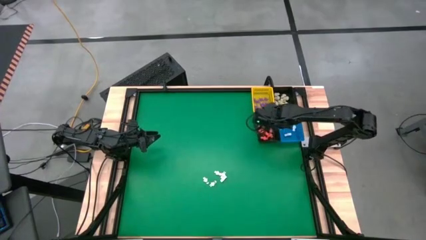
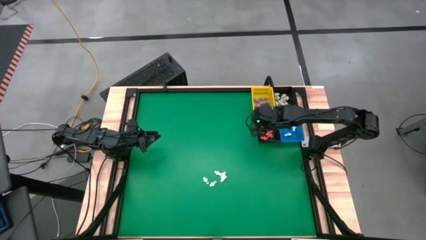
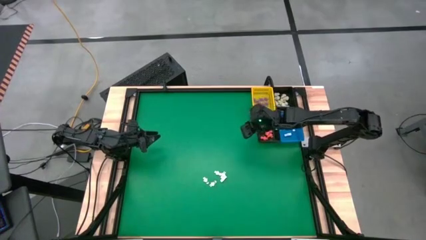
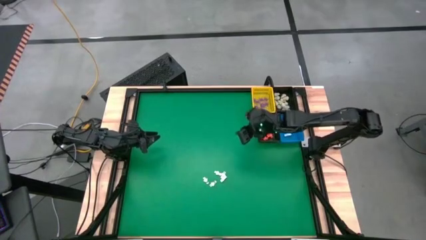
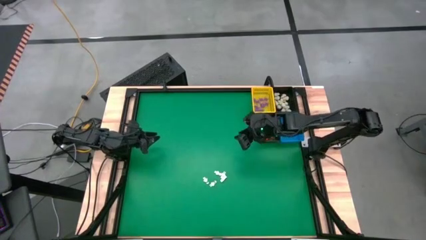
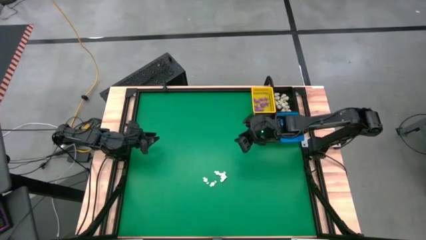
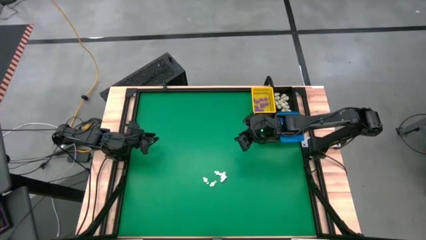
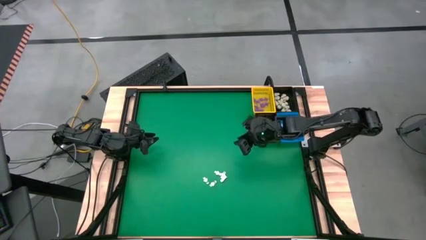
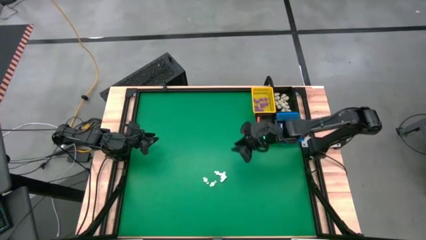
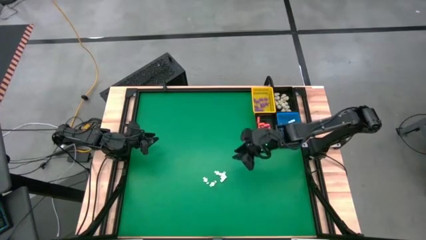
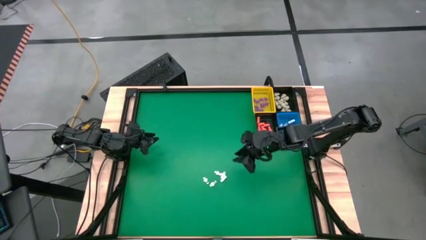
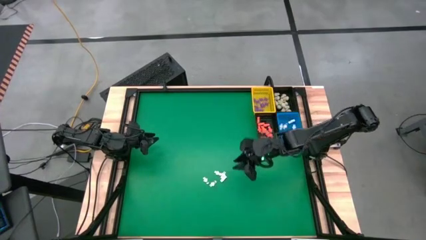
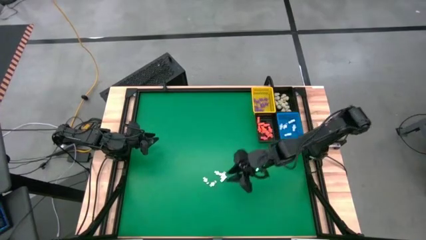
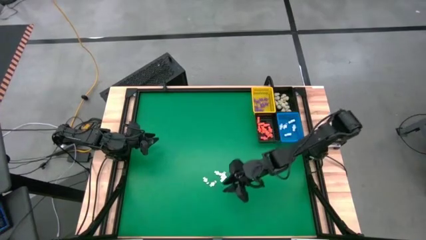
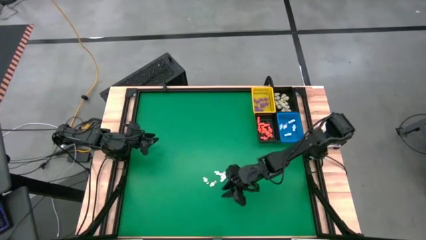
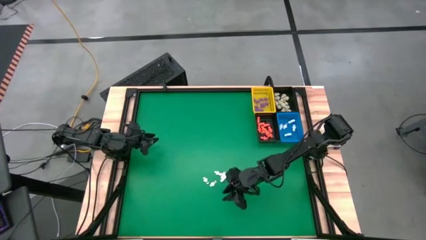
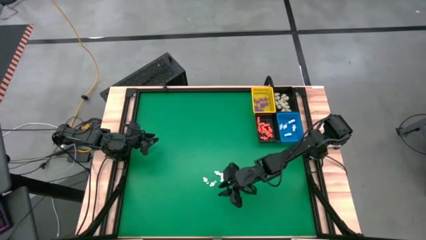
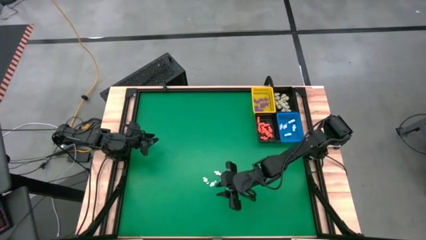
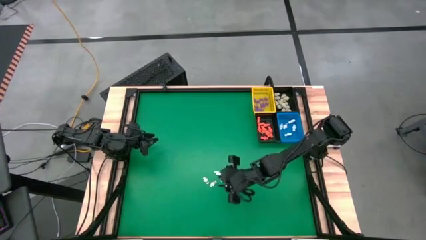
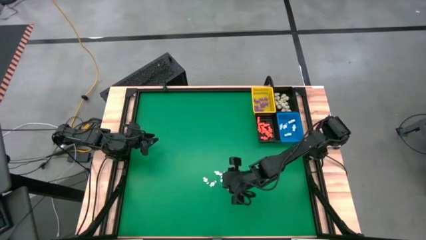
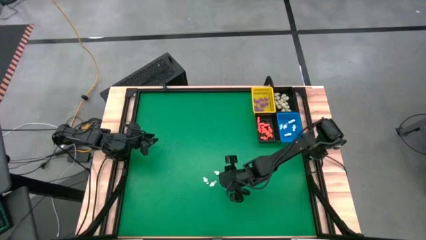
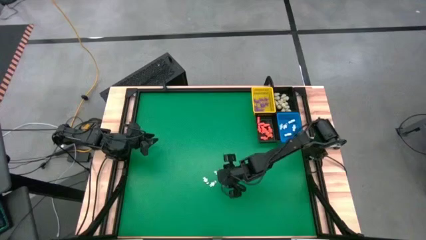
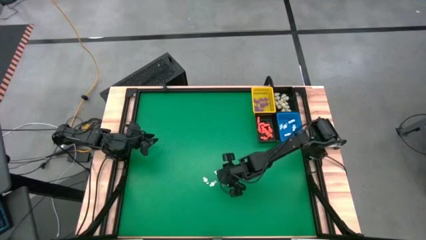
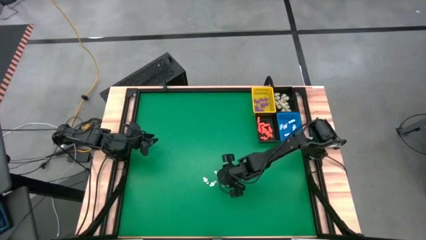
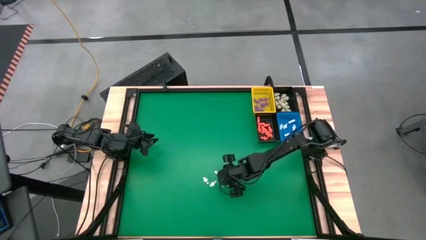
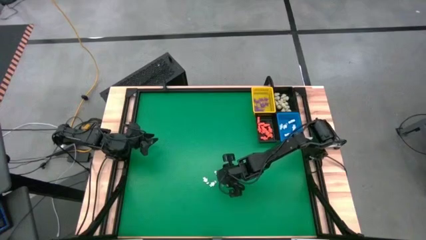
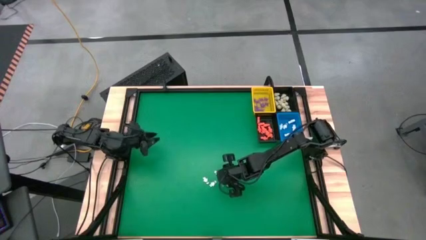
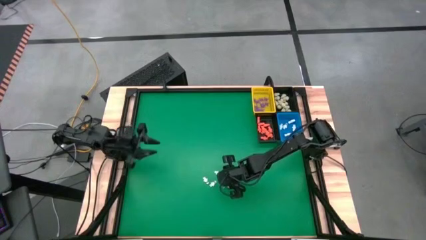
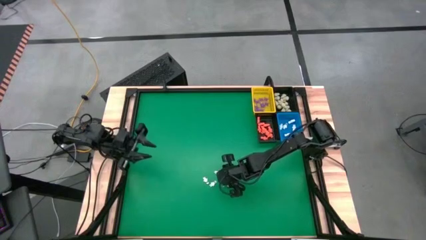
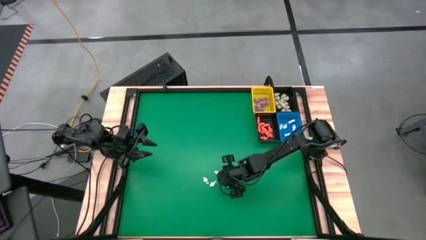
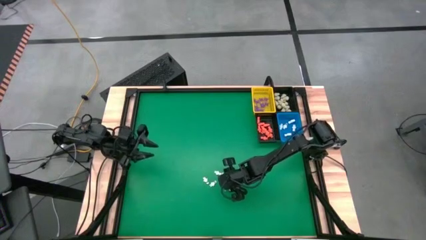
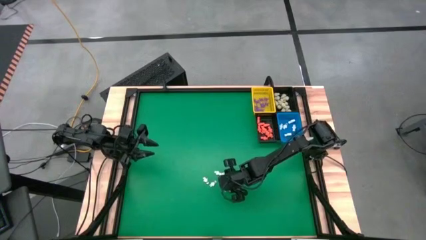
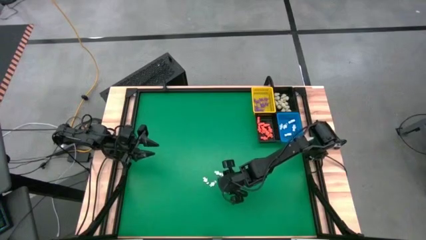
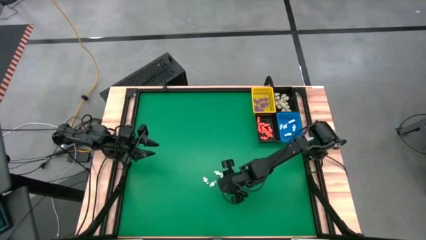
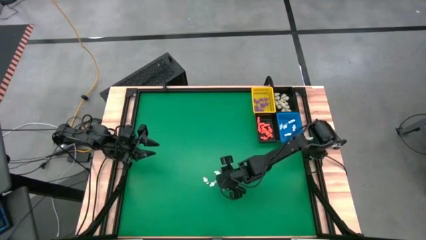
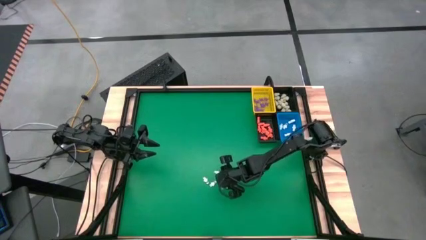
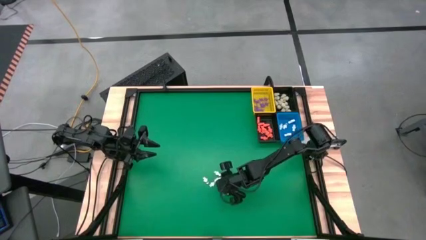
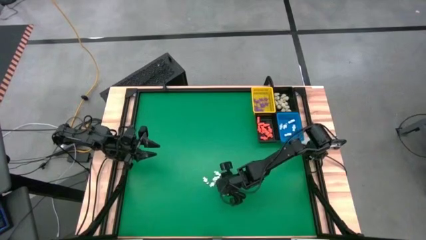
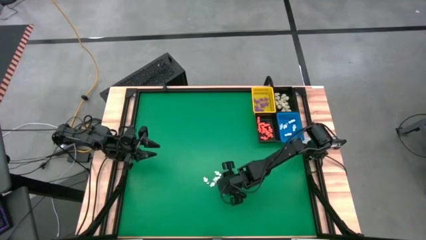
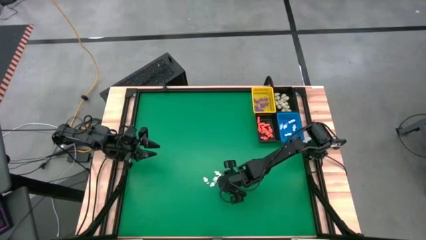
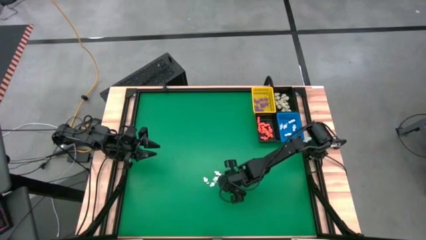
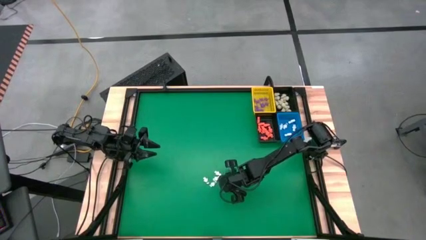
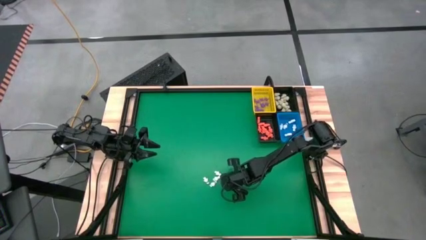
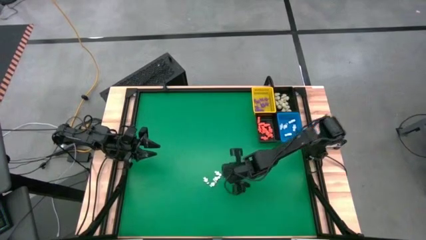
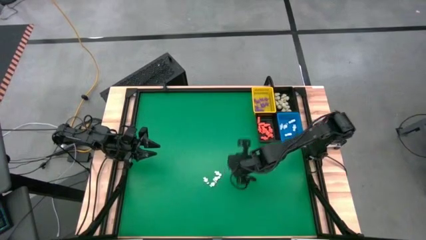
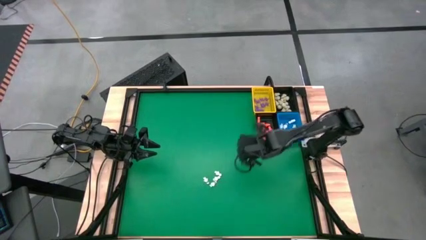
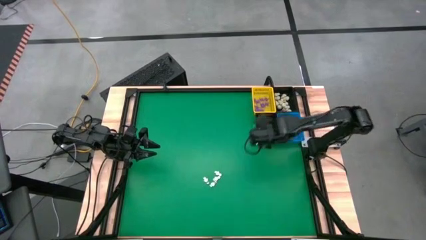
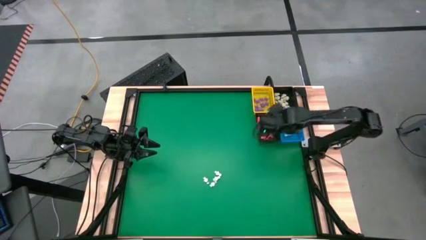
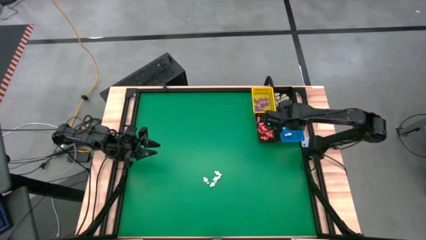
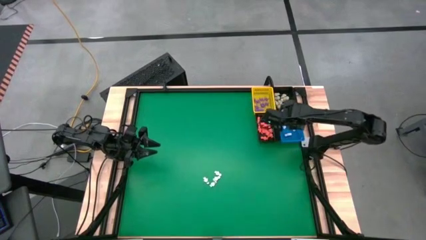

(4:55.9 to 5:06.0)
Task: Sort Halloween decoration
Put the white skeleton toy into the blue basket

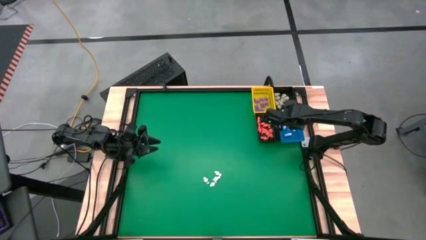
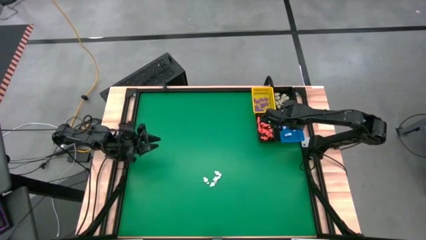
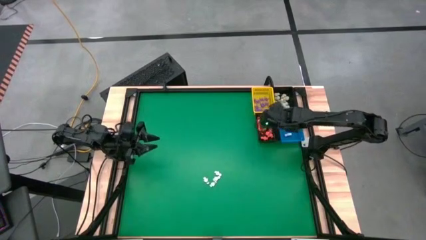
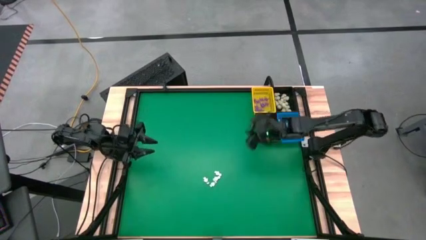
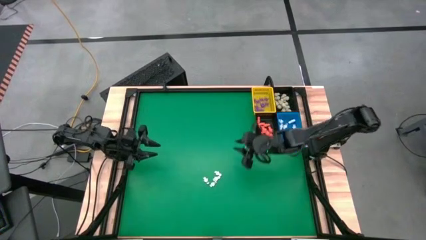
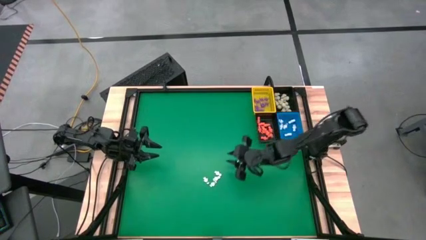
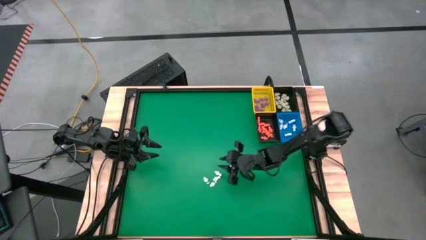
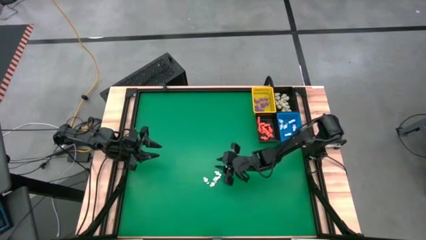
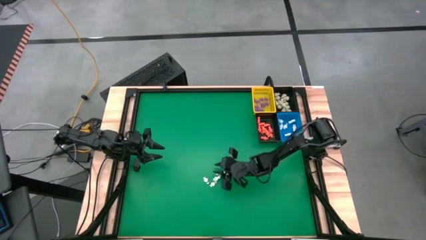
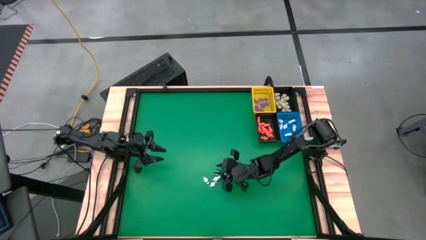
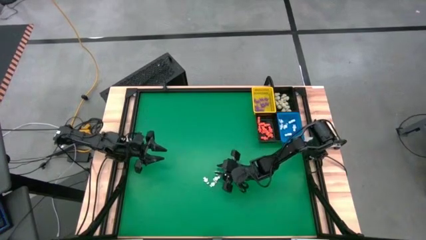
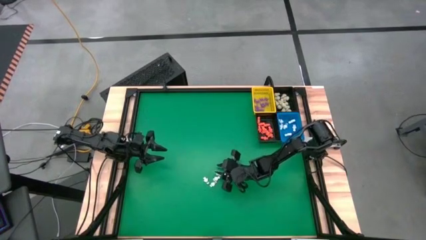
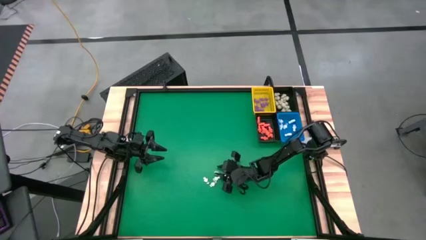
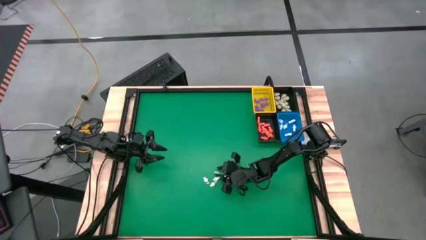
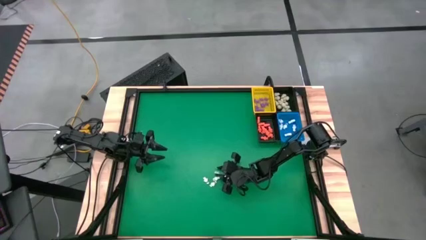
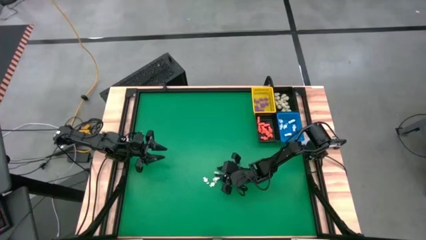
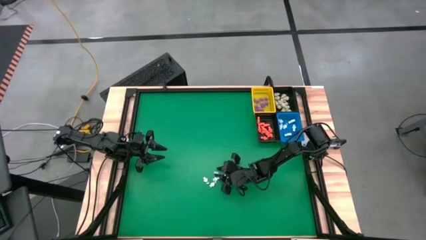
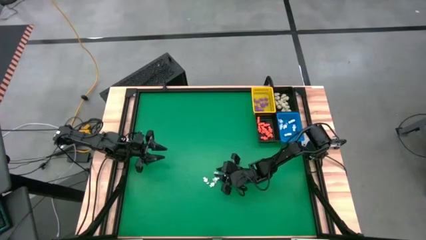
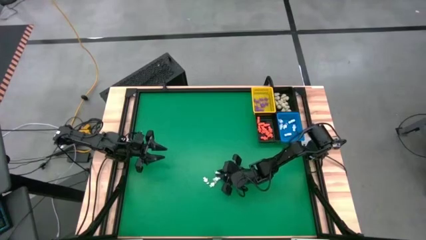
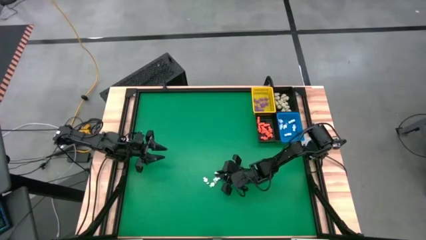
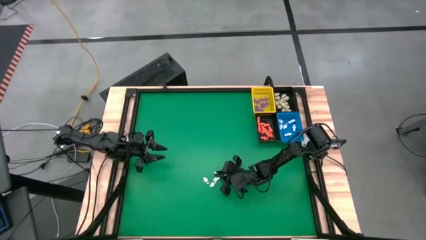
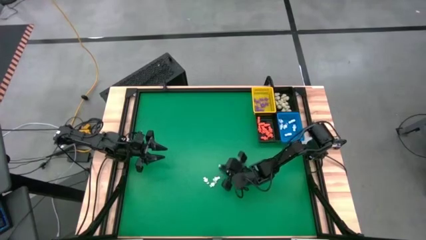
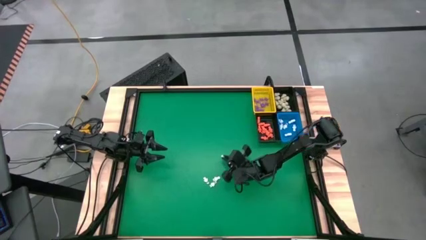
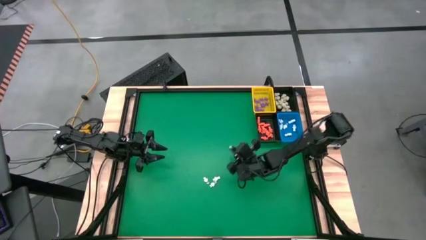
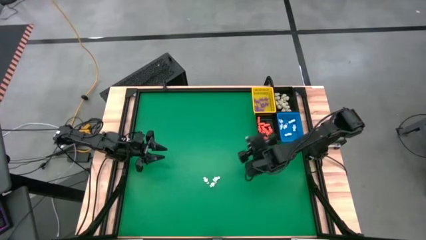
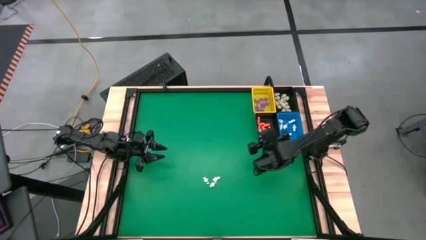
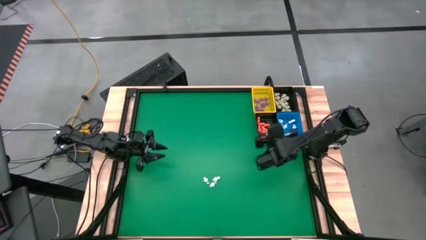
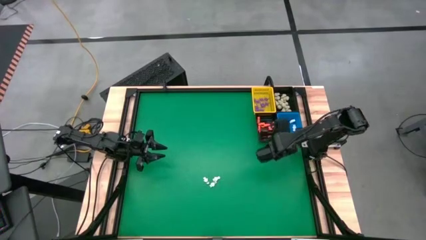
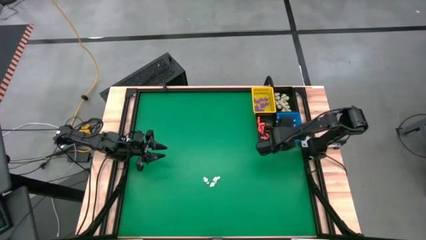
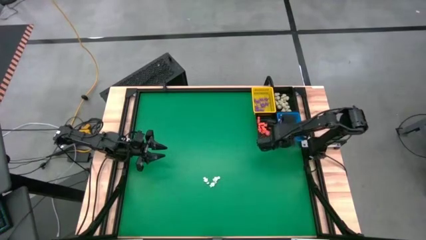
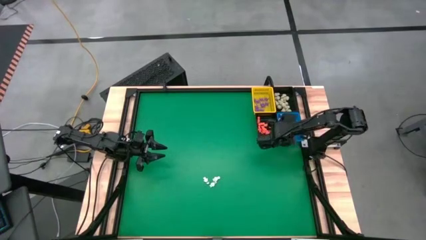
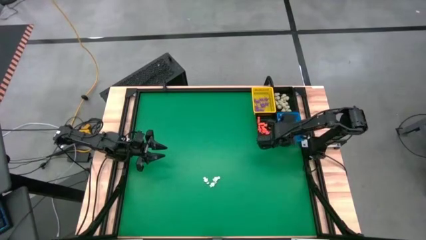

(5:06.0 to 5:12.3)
Put the white skeleton toy into the blue basket
